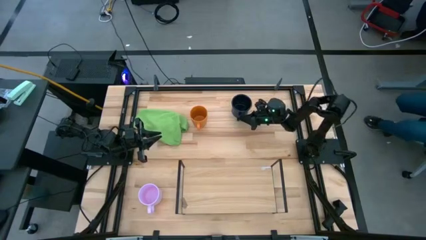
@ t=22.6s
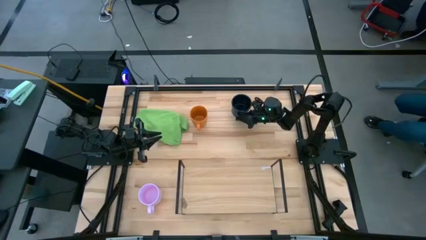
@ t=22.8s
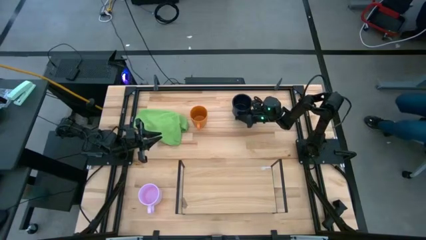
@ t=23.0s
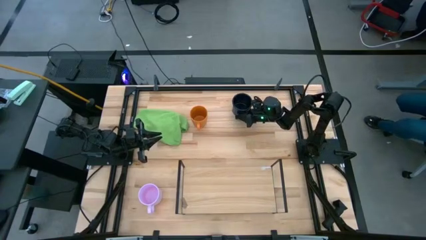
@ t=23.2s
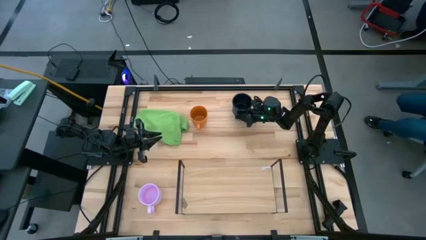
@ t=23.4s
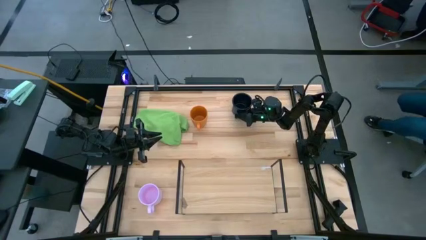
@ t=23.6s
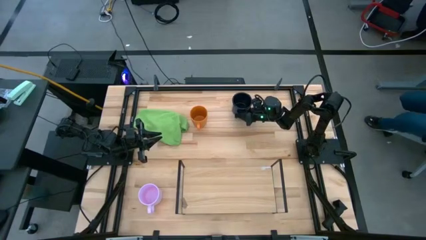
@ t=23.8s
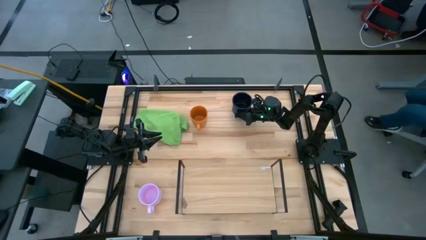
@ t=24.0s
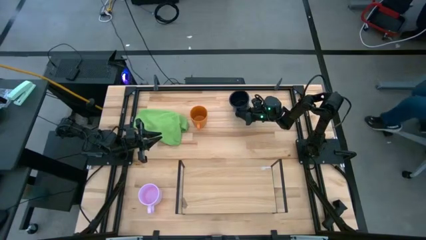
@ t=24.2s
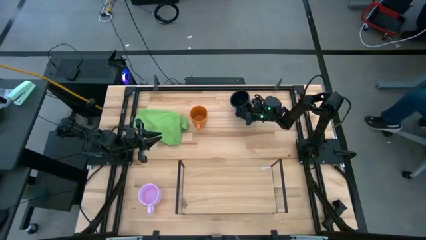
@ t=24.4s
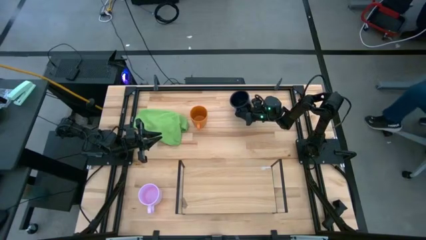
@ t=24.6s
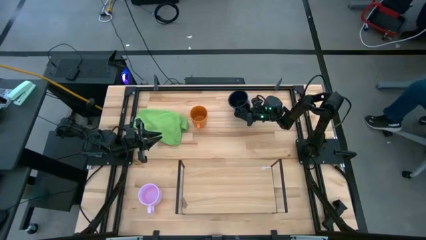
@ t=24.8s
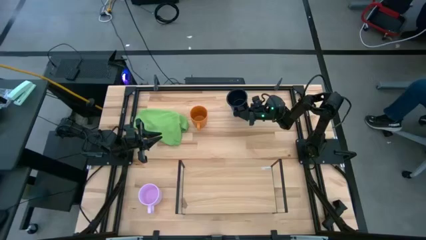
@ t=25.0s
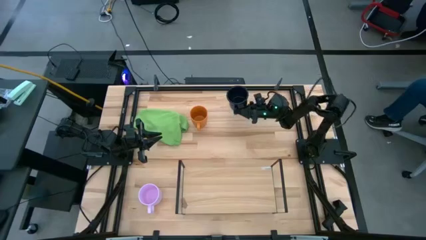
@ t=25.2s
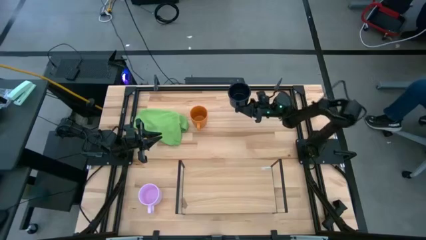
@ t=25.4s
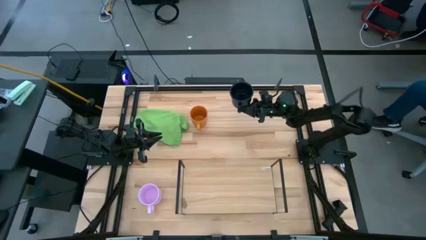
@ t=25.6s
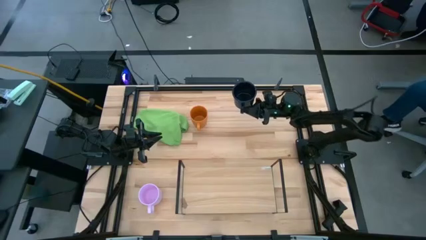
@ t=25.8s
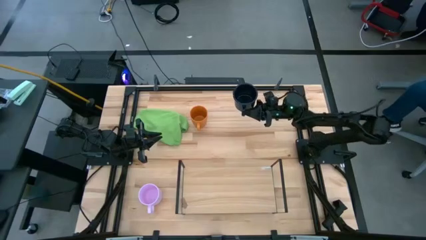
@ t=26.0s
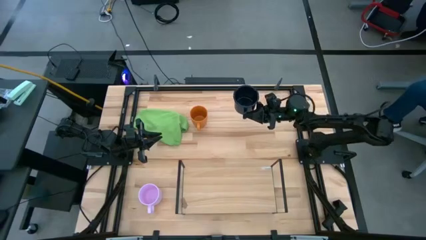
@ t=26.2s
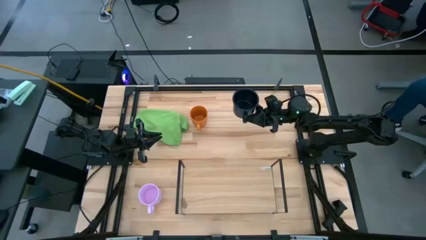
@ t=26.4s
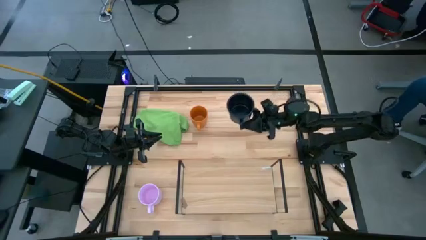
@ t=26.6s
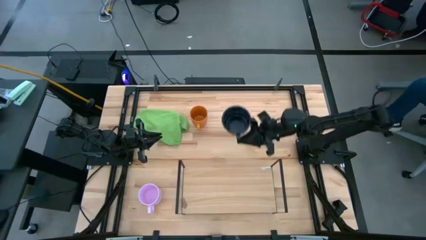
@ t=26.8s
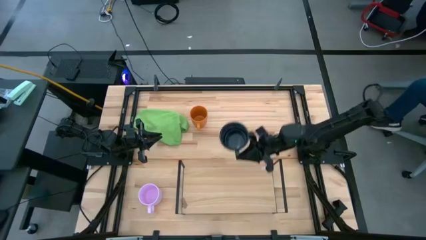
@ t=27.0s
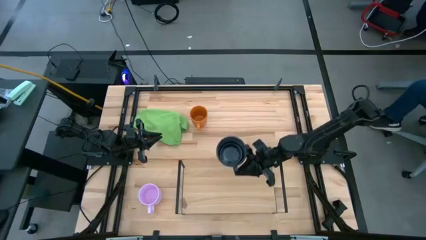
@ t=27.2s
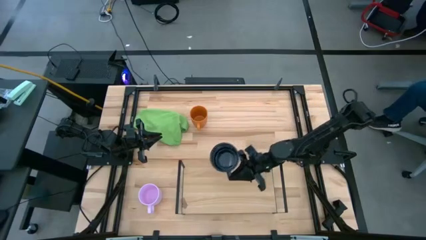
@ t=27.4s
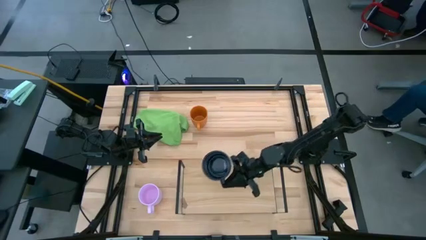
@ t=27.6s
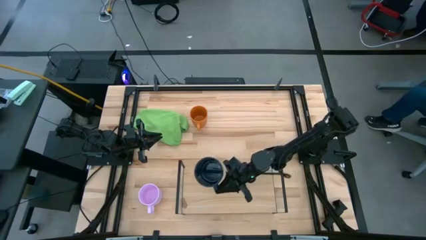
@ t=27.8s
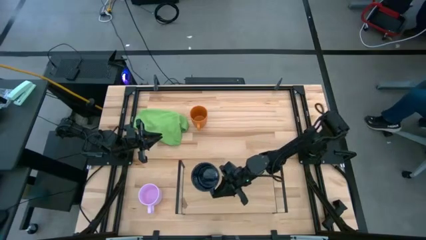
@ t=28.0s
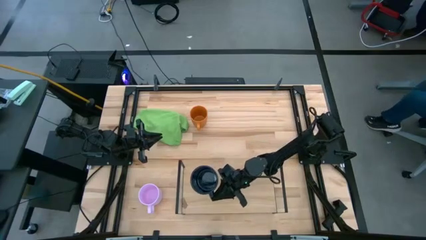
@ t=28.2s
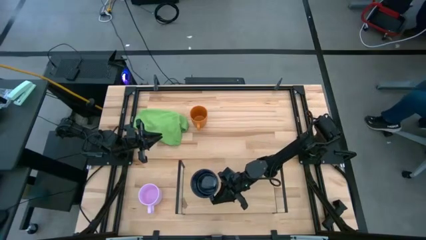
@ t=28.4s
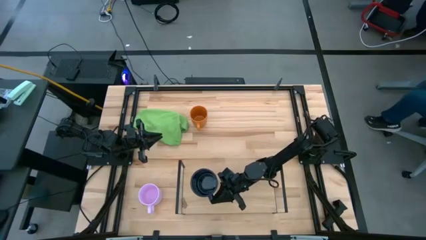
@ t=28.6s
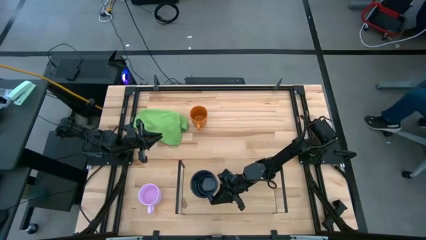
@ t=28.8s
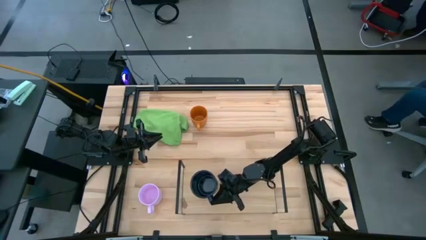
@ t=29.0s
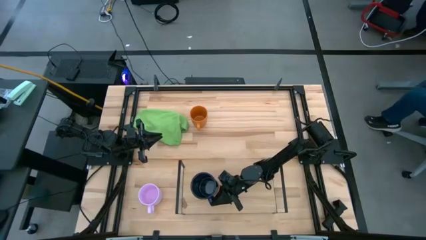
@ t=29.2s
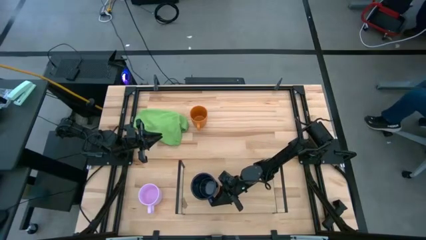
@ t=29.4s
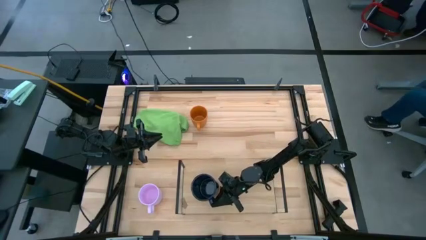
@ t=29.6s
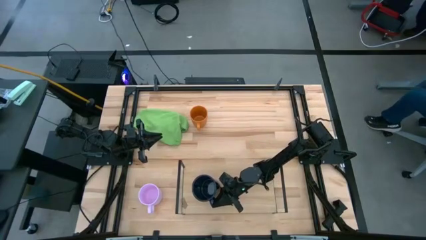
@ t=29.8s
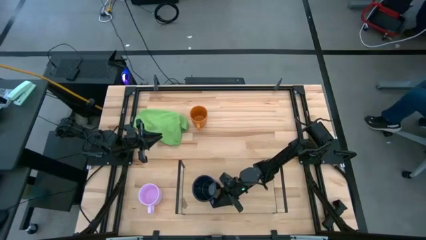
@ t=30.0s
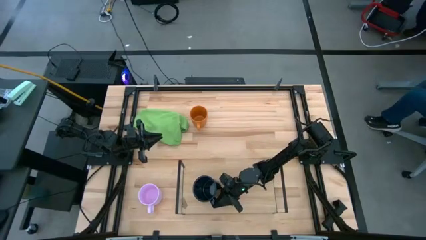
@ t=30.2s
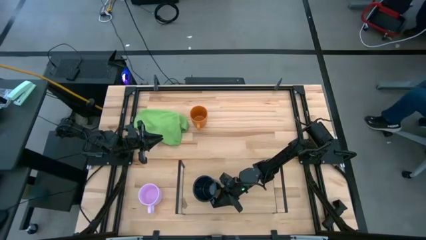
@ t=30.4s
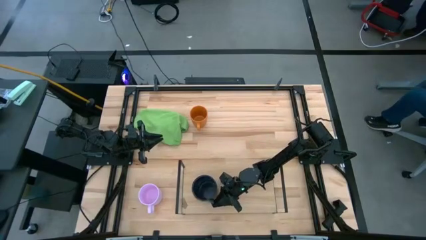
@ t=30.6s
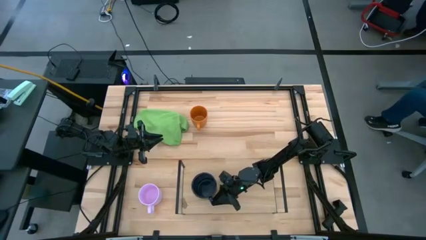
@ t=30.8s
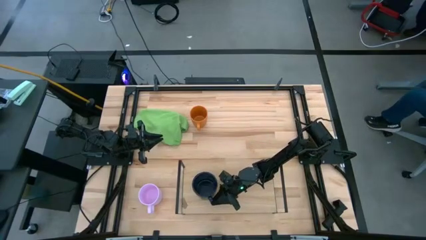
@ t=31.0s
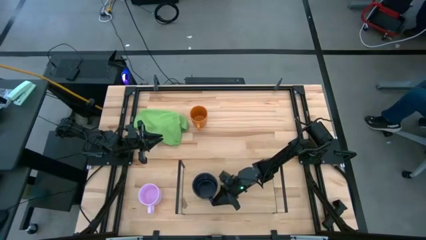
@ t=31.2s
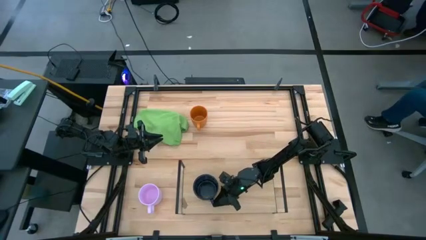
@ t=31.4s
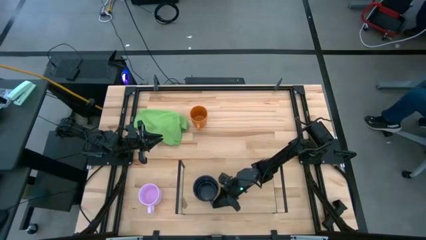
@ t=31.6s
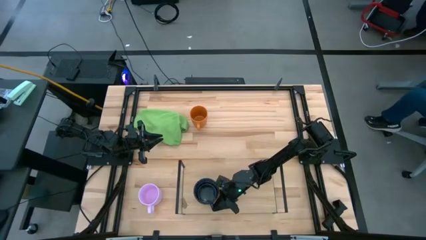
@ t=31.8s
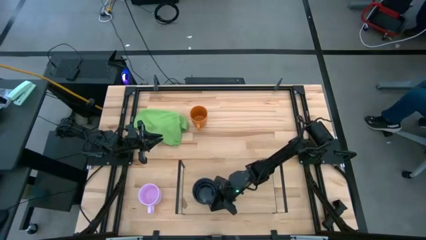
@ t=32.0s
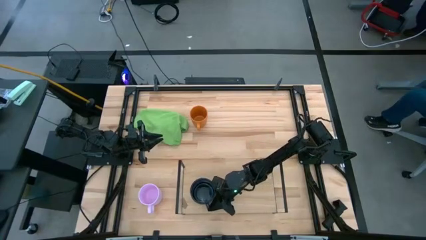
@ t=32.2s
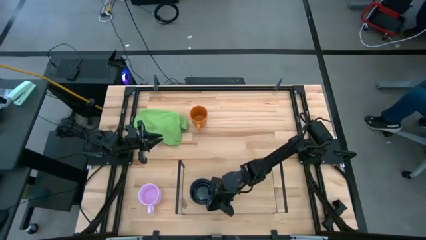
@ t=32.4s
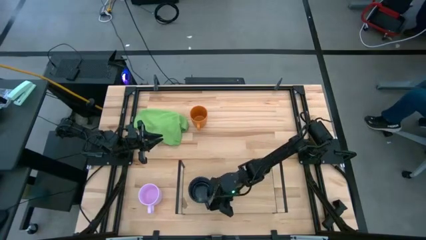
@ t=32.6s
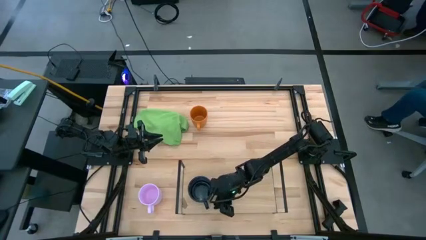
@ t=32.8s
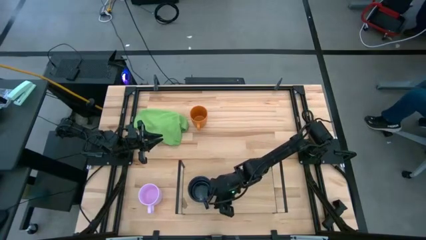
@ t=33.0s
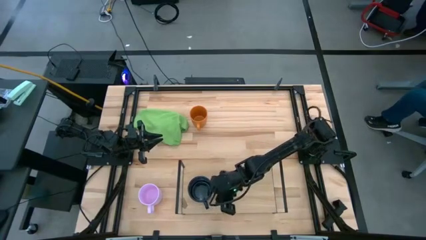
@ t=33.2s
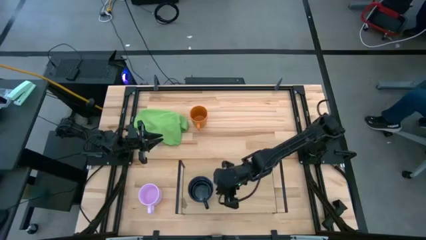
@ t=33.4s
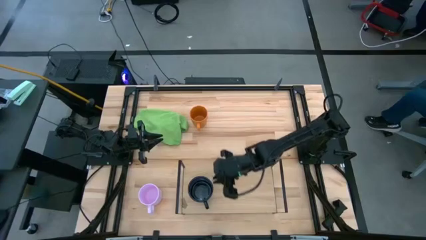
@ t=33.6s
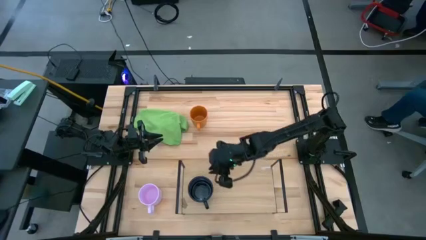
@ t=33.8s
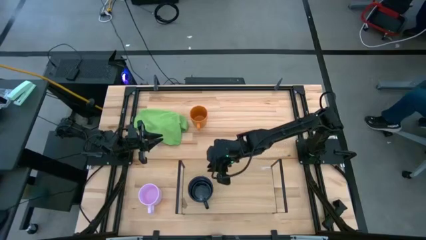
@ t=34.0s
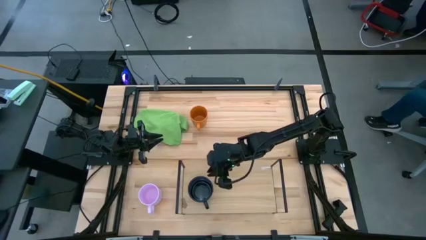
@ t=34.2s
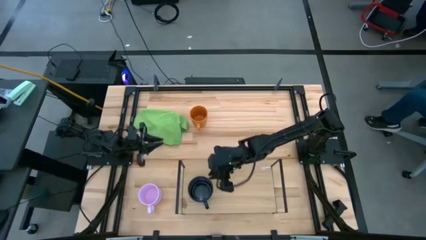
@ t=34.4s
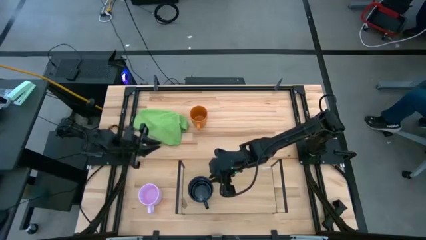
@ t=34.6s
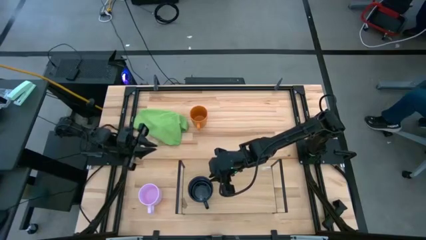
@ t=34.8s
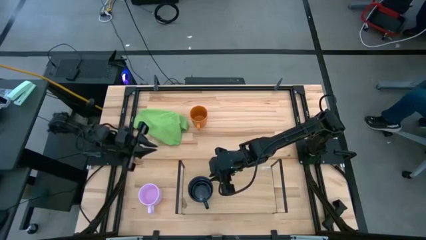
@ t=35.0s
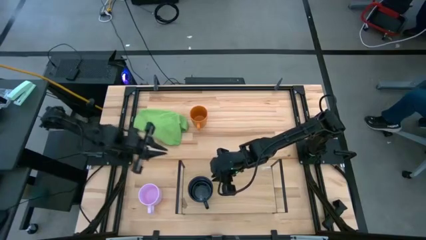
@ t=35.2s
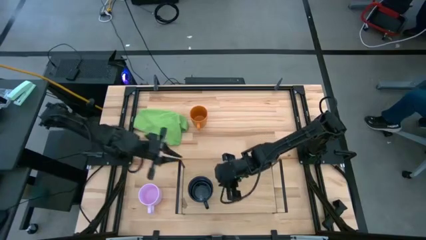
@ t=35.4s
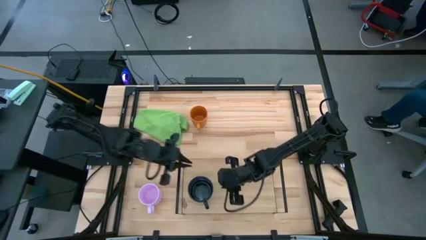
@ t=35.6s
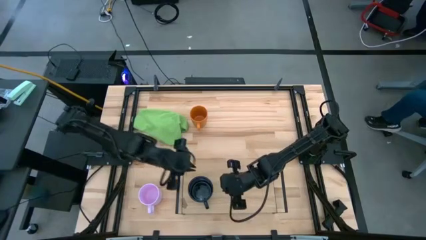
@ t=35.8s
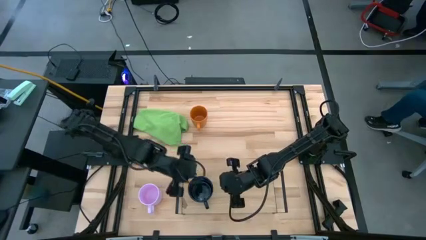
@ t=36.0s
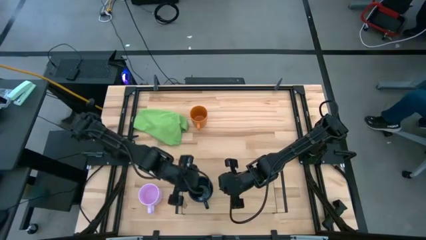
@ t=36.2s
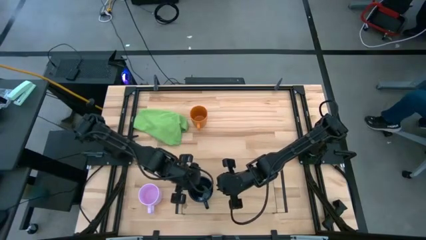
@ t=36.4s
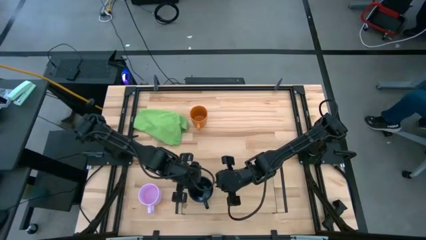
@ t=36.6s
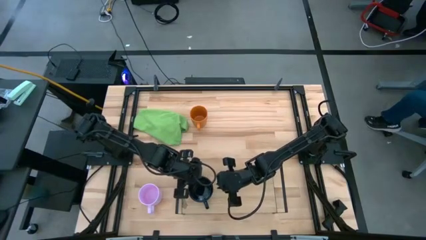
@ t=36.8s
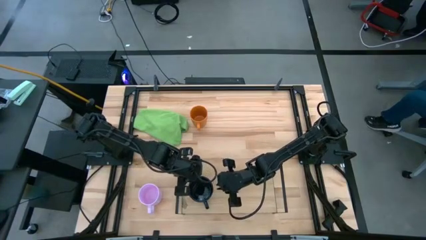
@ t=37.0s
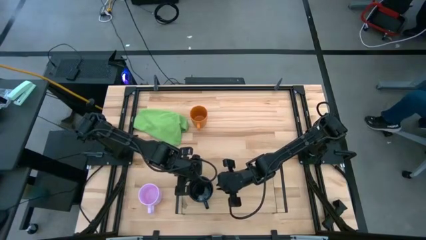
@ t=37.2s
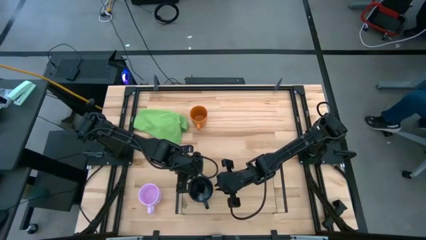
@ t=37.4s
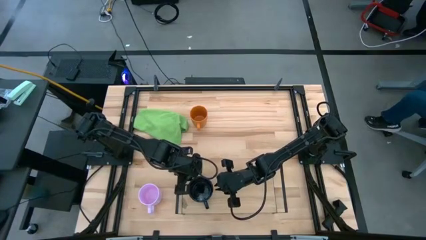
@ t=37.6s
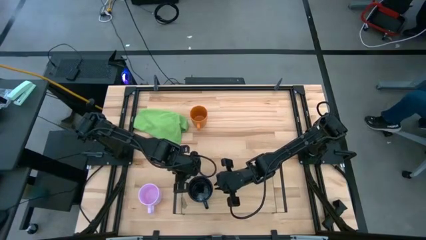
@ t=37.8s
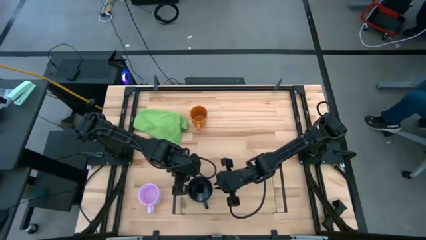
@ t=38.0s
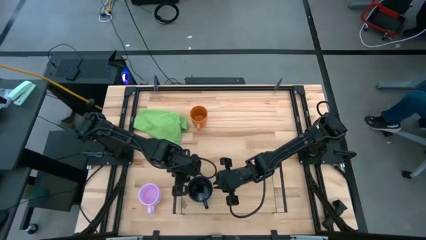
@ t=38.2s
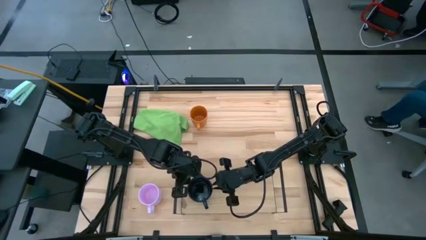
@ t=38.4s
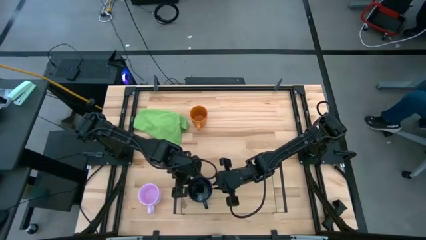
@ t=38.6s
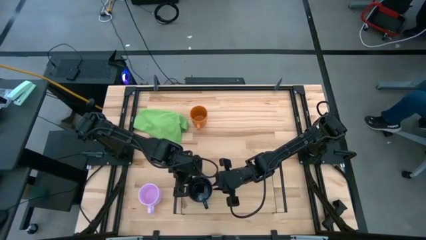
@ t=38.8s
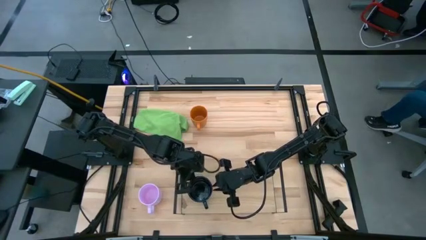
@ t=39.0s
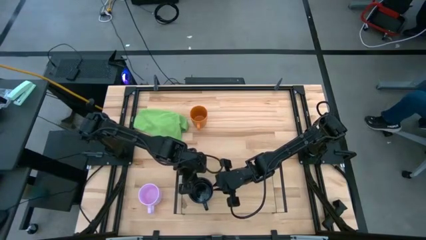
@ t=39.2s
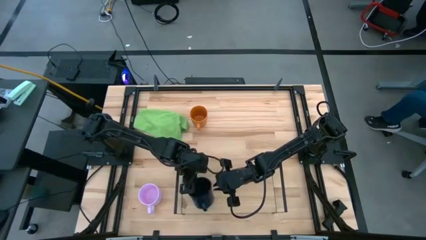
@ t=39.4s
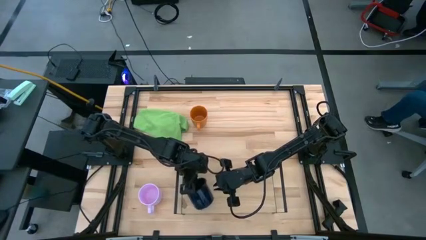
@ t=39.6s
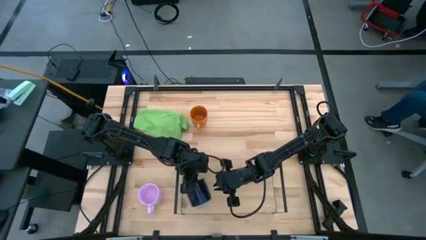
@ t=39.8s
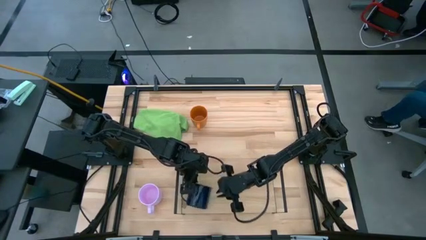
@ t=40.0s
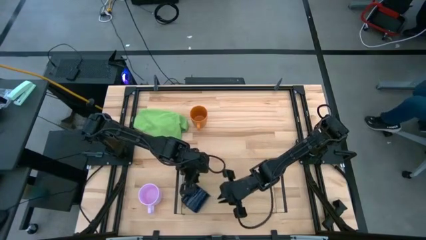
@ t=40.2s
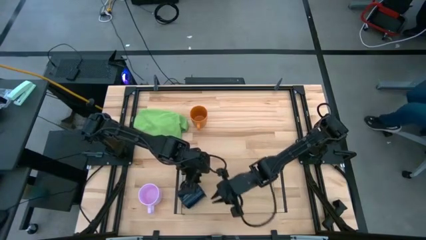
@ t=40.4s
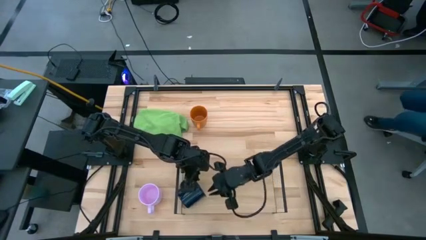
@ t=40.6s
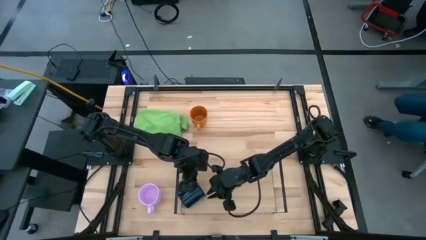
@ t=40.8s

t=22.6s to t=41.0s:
Task: Stack small to large cups/mugs on shelf
Put the dark blue mug on the shelf
